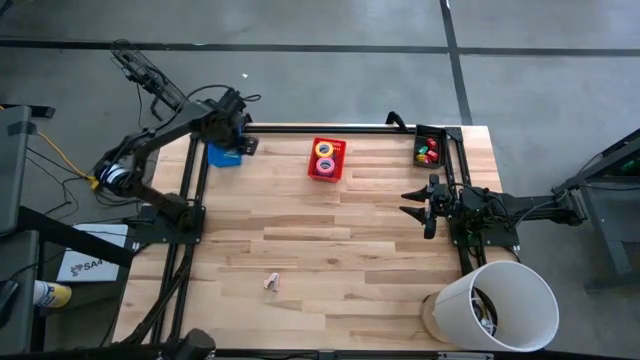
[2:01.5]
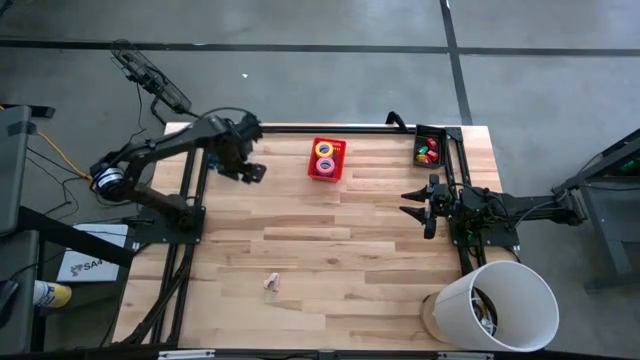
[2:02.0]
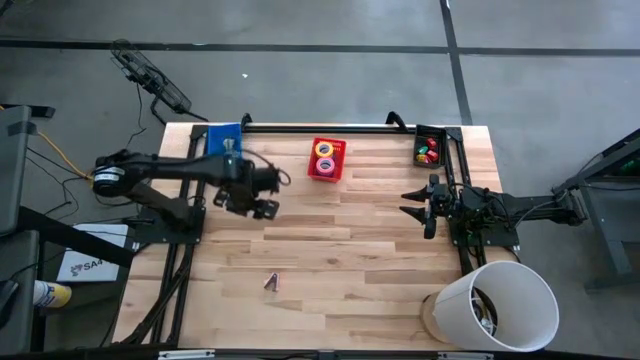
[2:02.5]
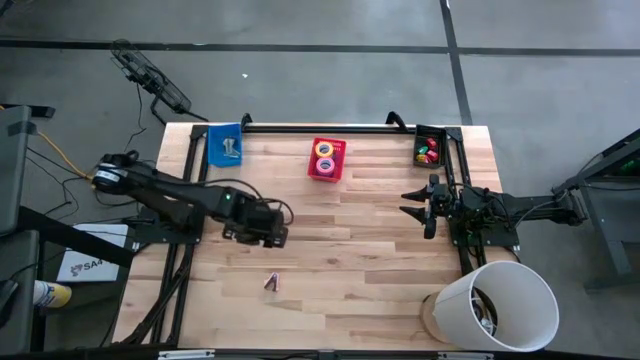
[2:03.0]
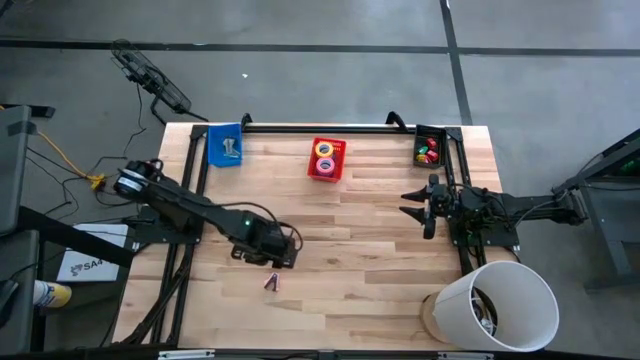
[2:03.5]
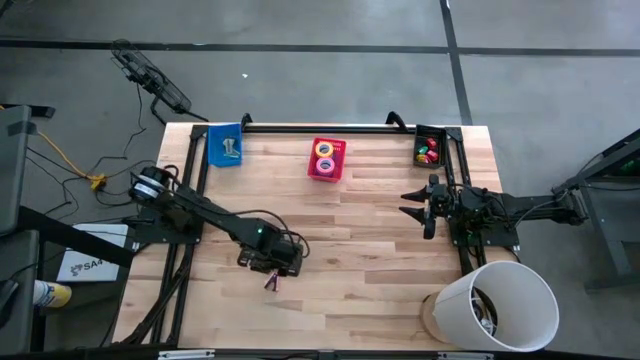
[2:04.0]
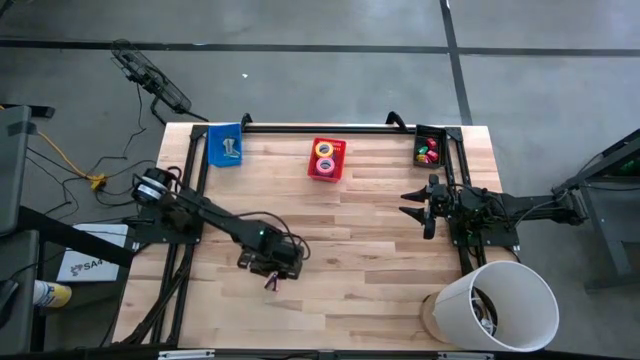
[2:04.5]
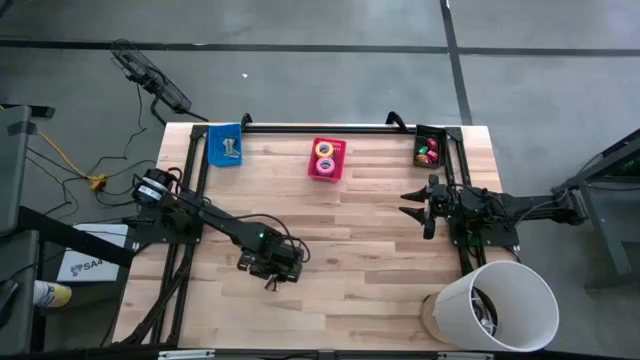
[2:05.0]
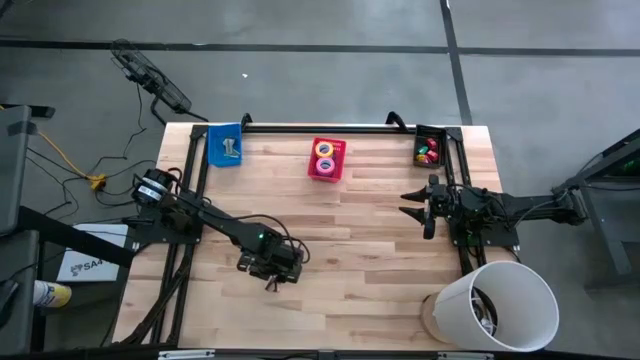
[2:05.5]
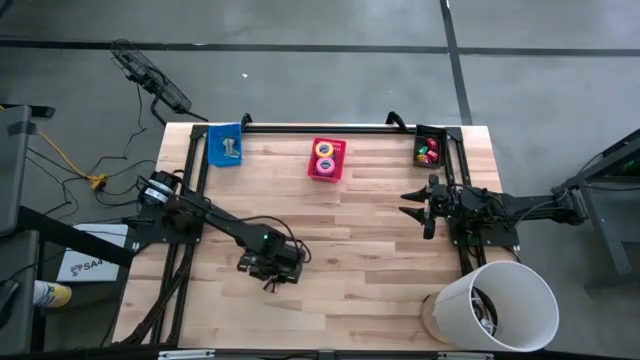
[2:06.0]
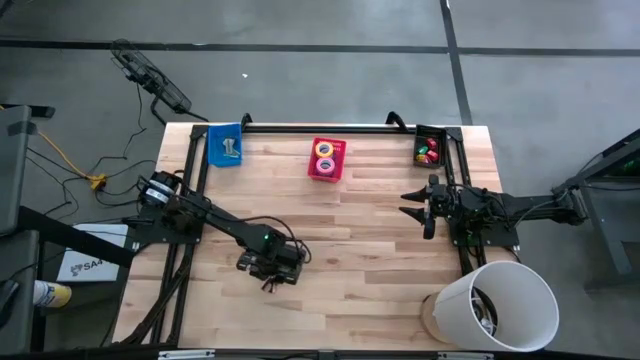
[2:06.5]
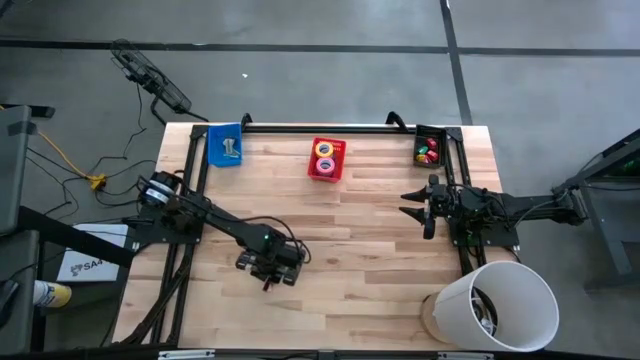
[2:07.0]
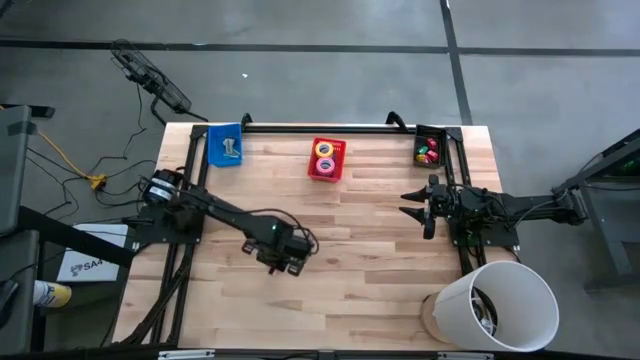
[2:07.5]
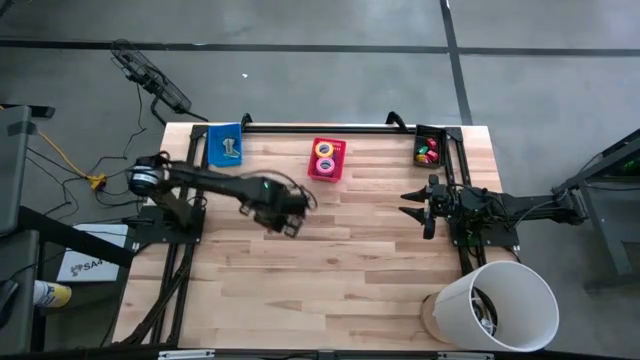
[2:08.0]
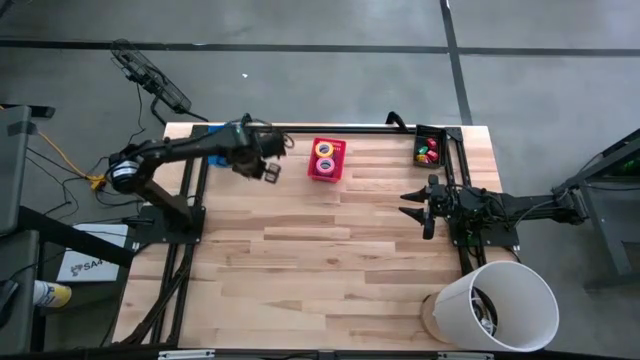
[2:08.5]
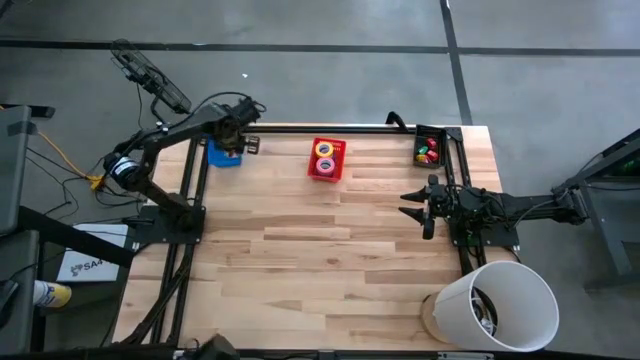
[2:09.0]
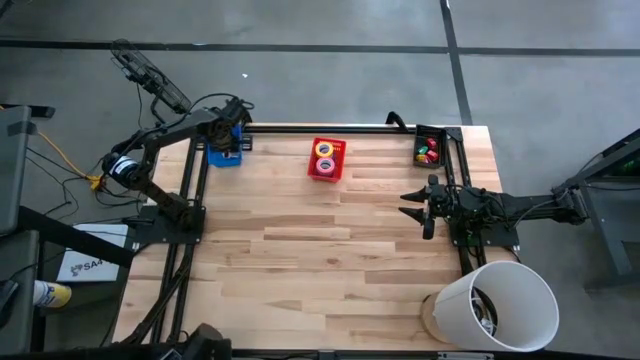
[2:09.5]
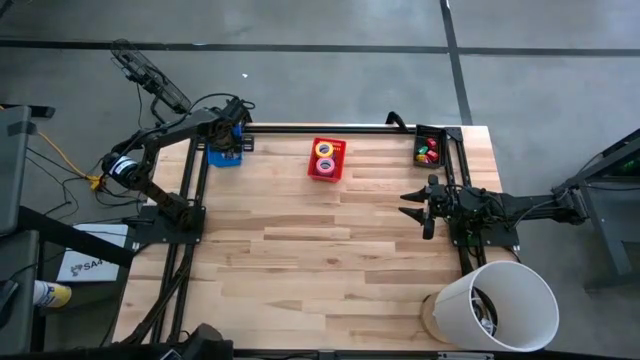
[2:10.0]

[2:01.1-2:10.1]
Task: Pick and place Stapler, Stapler remover, tape
Put the pink staple remover into the blue bin

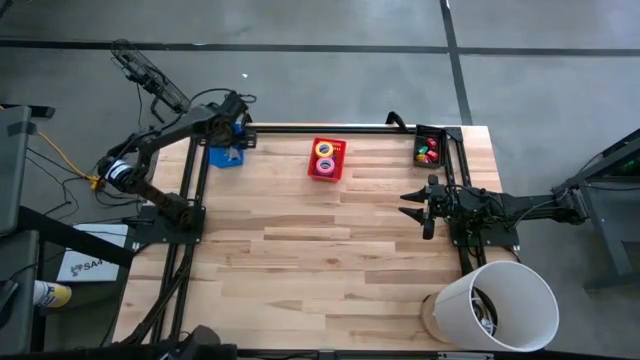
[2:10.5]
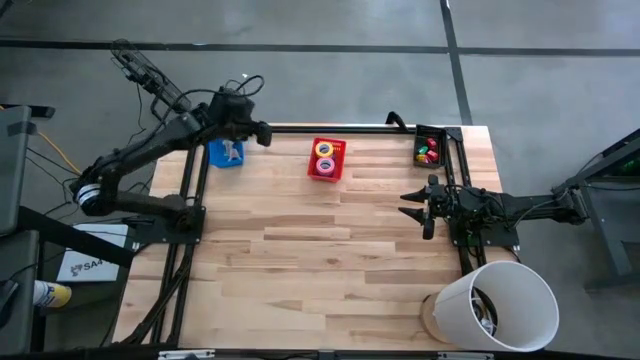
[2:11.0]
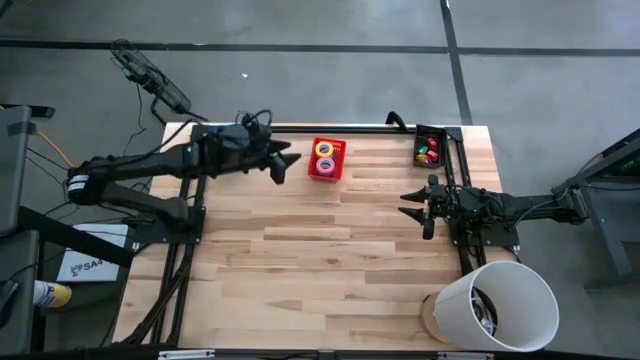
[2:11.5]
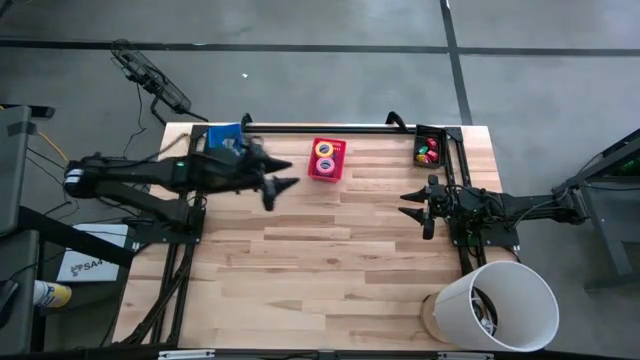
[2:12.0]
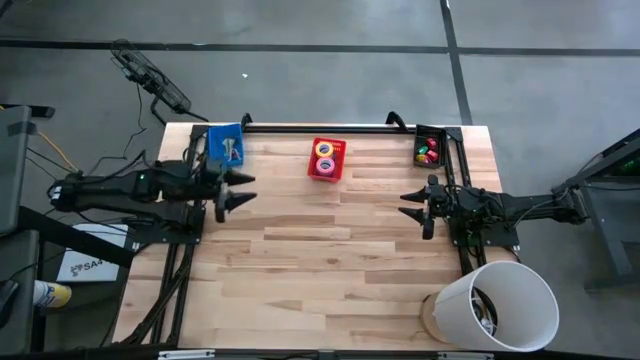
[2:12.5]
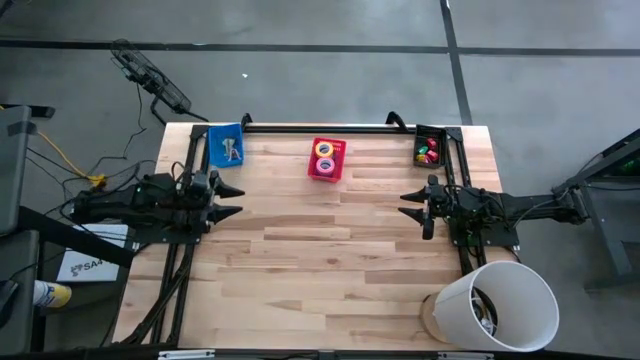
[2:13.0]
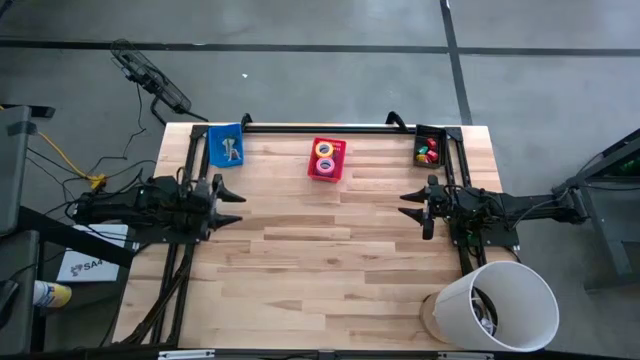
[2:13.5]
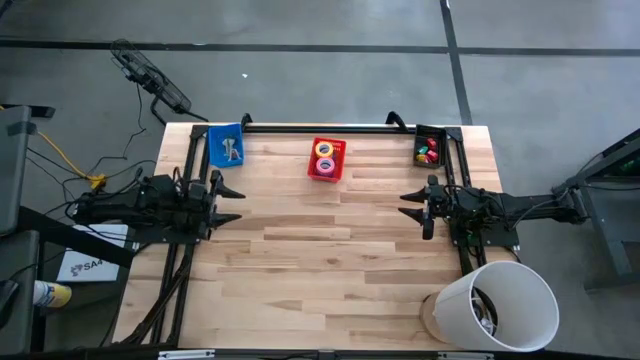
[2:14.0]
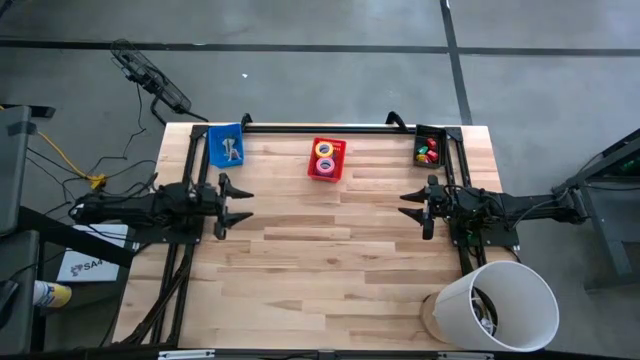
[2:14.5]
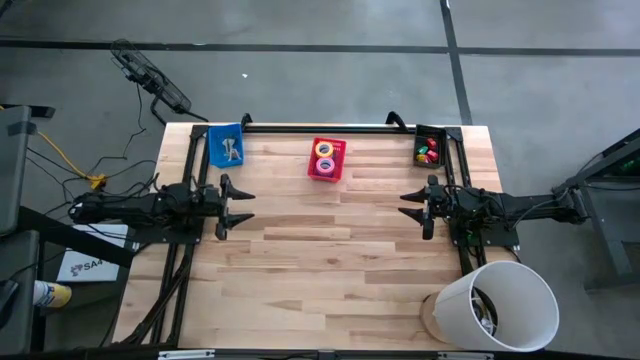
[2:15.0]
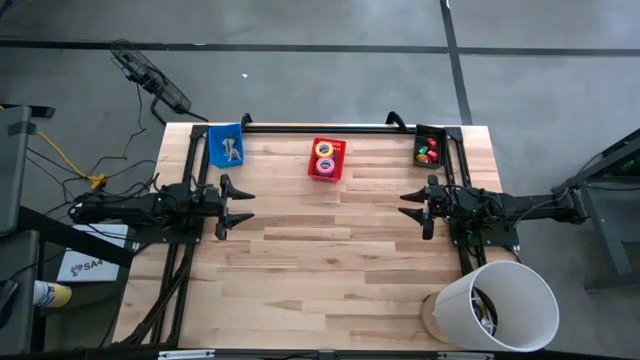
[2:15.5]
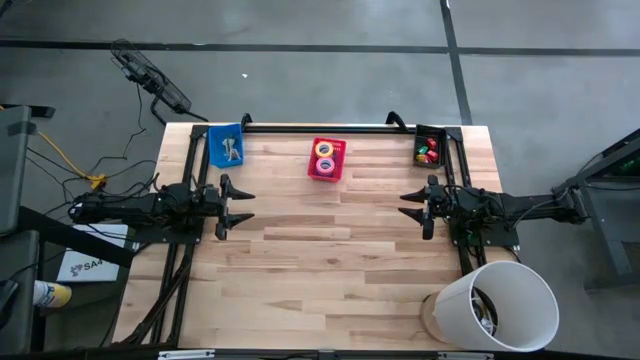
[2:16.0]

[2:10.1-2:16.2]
Return to Home Position

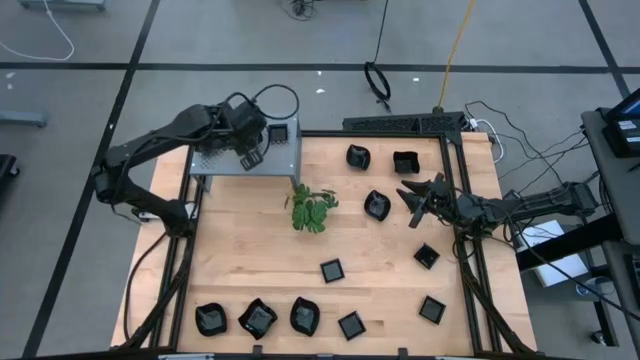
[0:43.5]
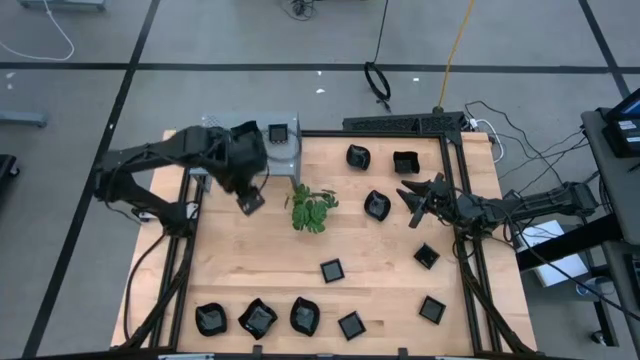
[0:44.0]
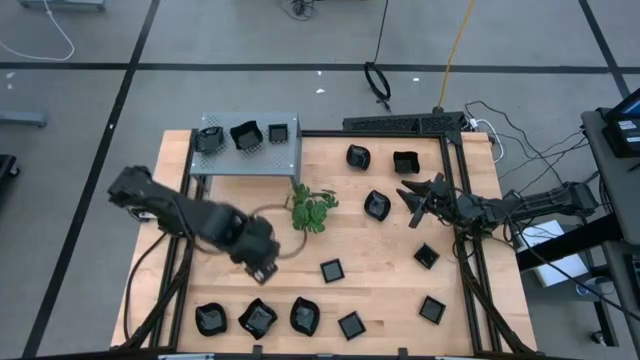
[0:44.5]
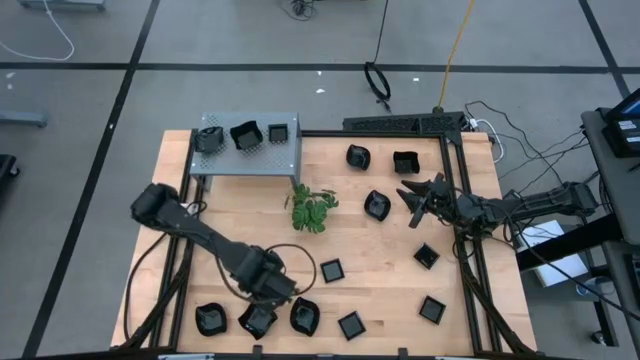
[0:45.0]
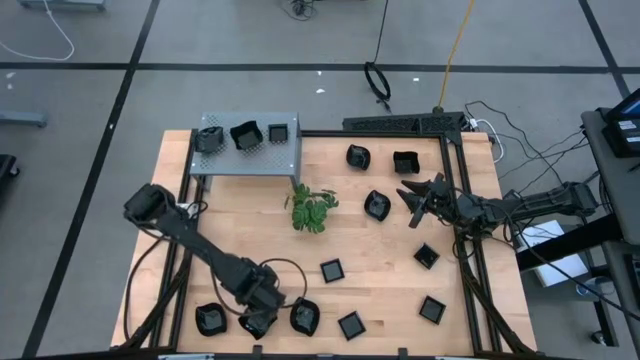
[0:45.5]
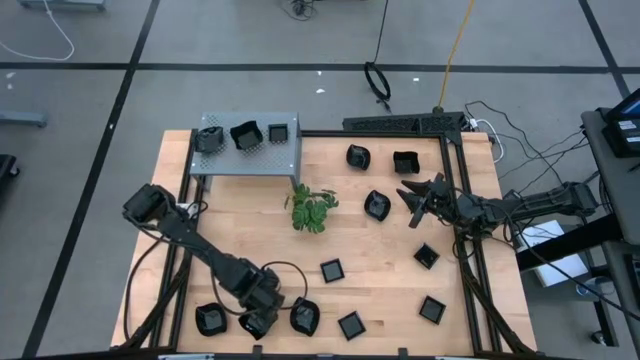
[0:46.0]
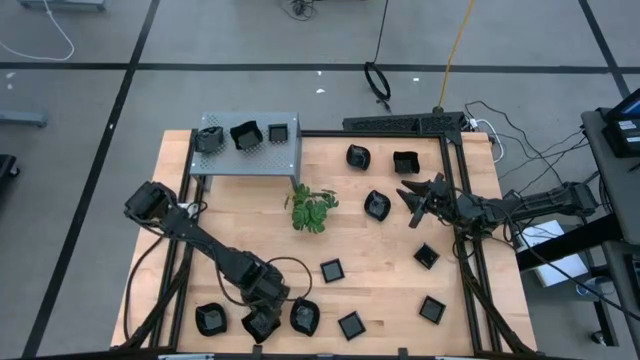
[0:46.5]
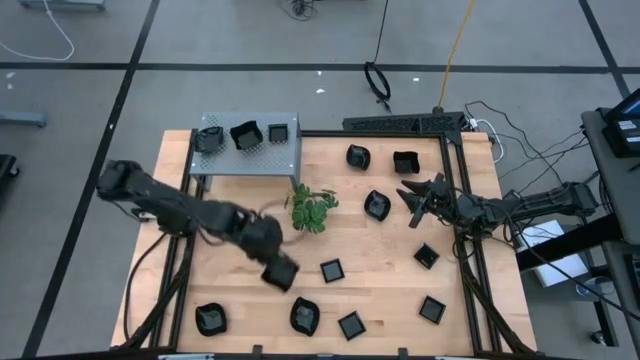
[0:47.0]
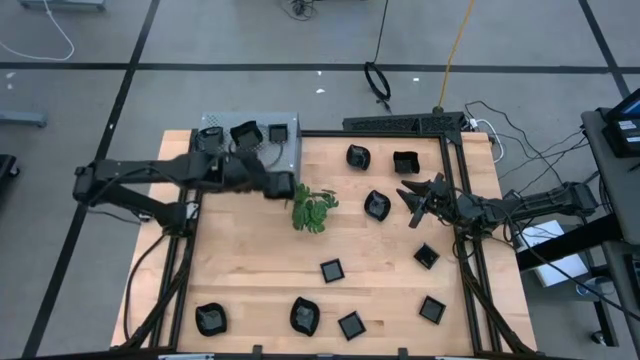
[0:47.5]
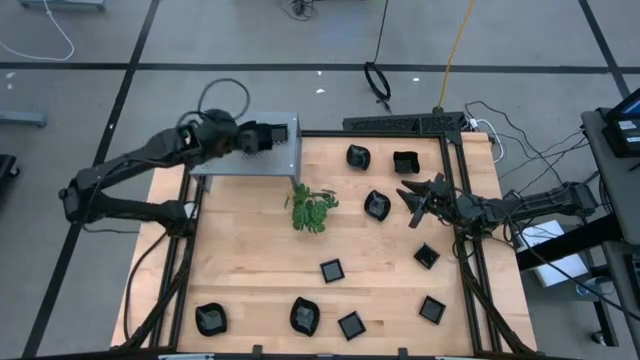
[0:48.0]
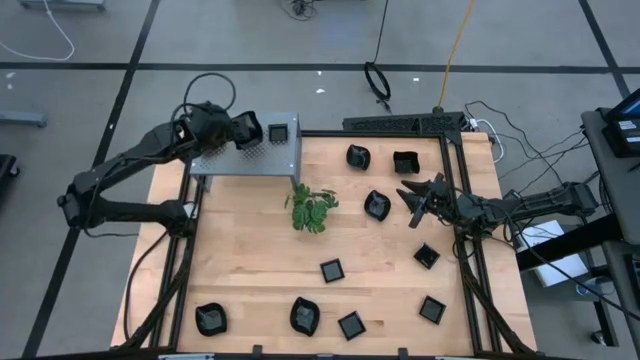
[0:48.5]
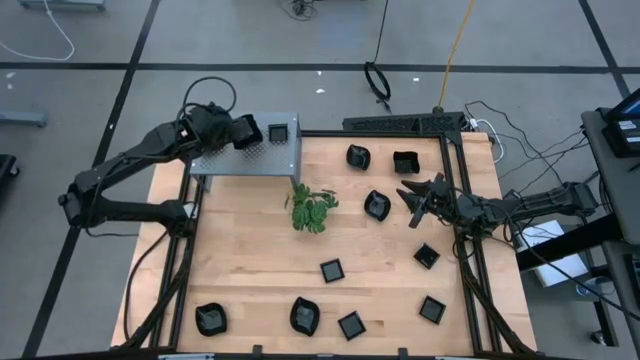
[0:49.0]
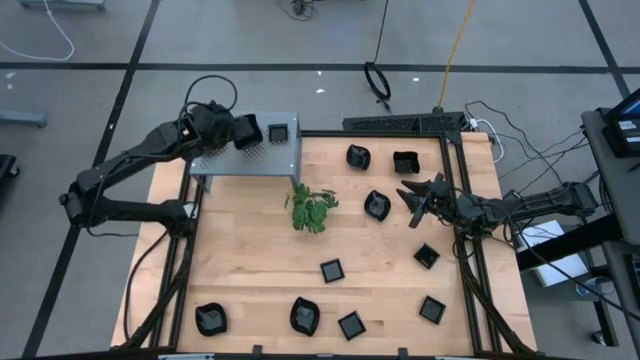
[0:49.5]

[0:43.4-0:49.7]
Task: Pick & Place Mini shaped plates
Stack the distorted square plate on top of the distorted square plate on the shelf
